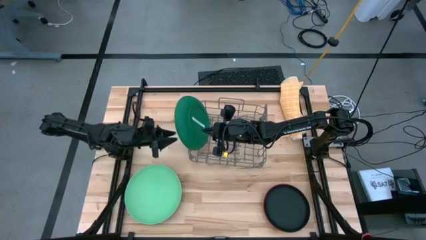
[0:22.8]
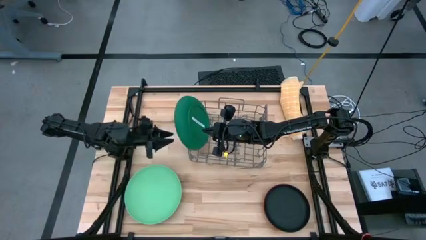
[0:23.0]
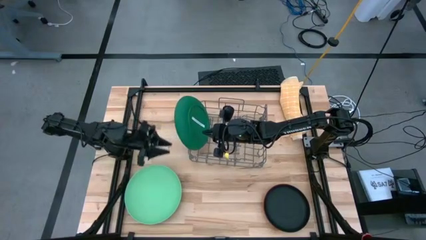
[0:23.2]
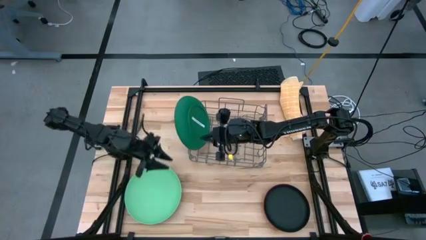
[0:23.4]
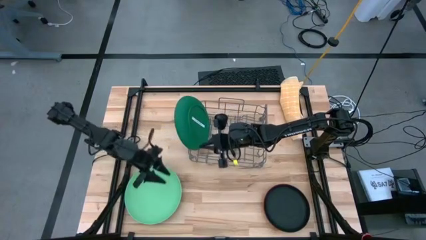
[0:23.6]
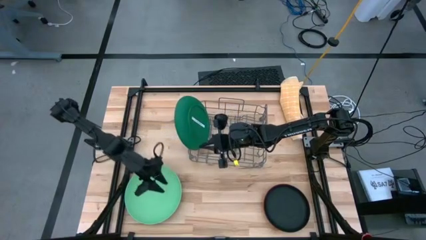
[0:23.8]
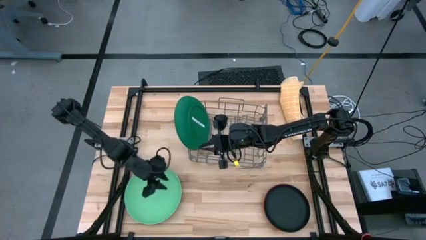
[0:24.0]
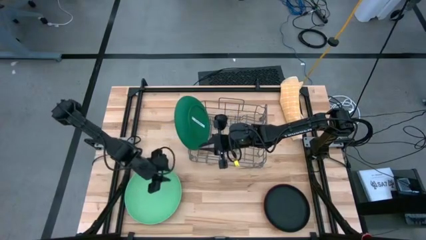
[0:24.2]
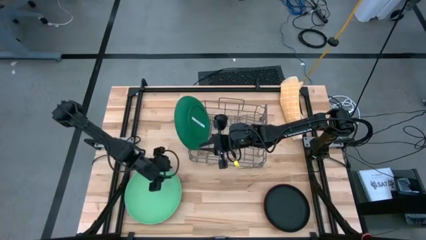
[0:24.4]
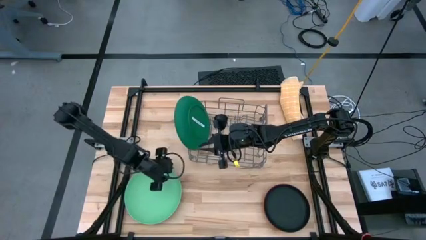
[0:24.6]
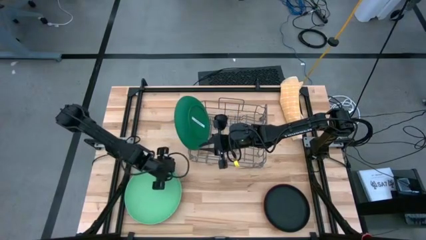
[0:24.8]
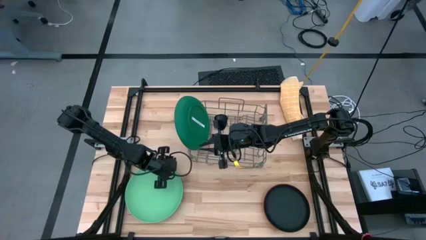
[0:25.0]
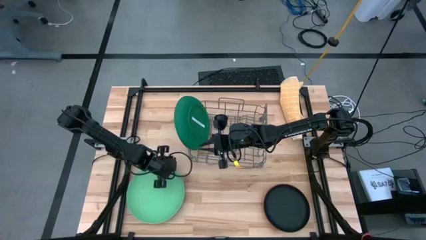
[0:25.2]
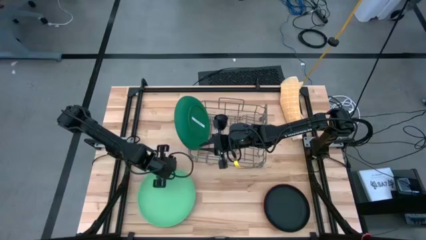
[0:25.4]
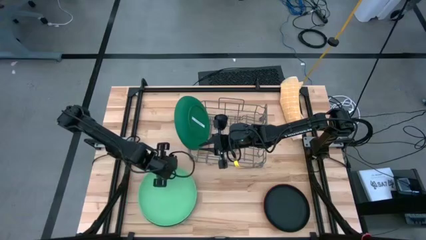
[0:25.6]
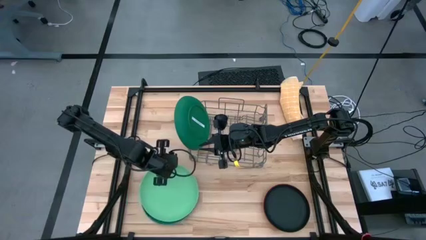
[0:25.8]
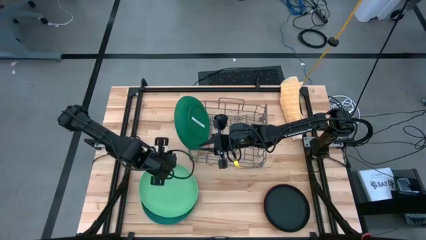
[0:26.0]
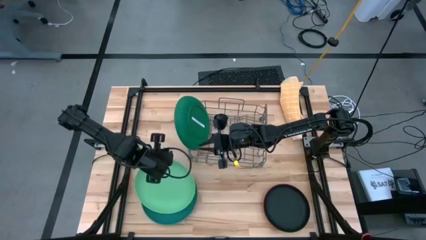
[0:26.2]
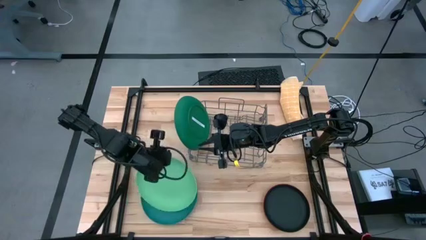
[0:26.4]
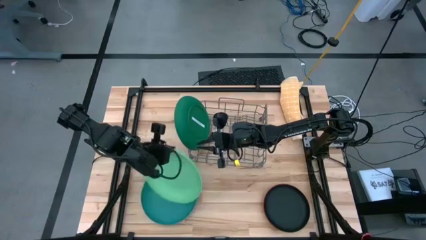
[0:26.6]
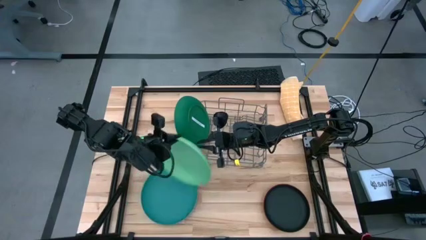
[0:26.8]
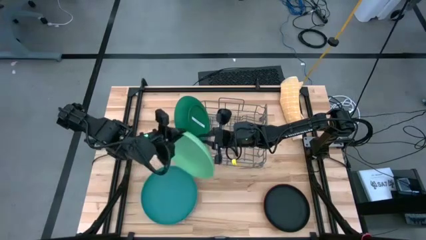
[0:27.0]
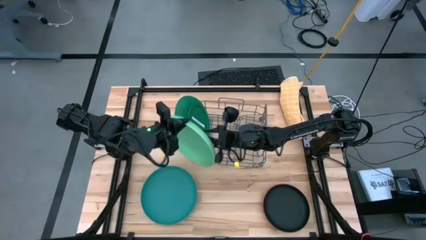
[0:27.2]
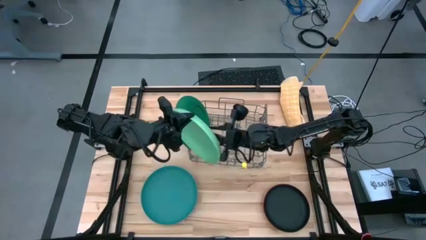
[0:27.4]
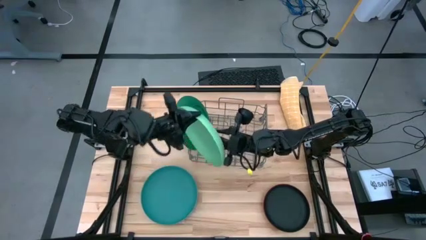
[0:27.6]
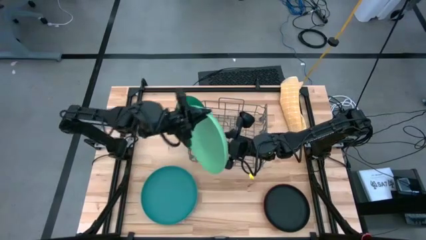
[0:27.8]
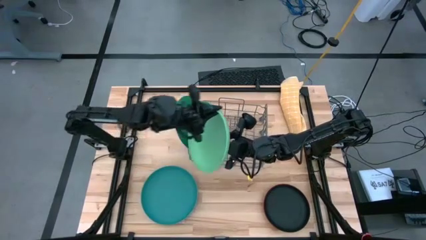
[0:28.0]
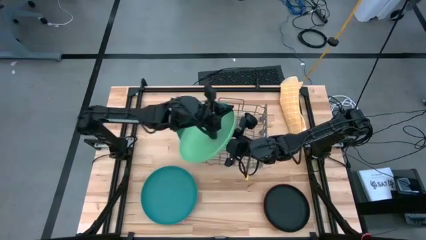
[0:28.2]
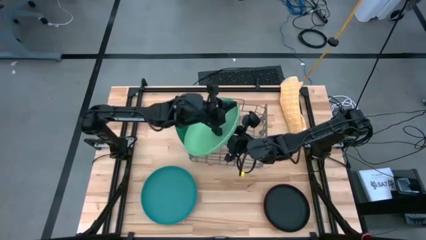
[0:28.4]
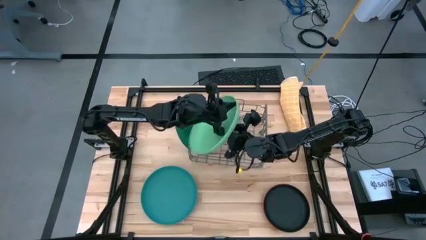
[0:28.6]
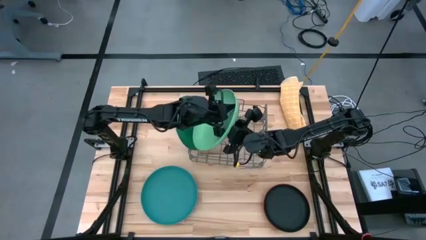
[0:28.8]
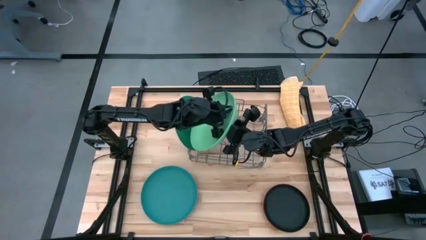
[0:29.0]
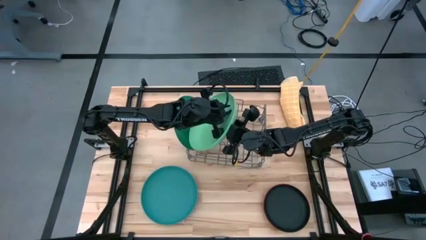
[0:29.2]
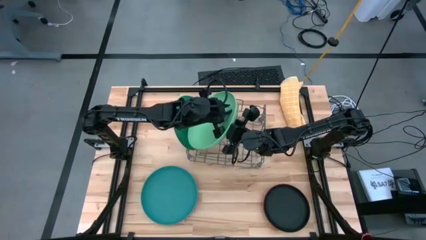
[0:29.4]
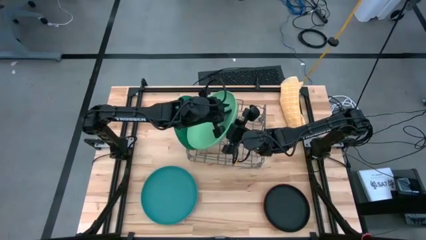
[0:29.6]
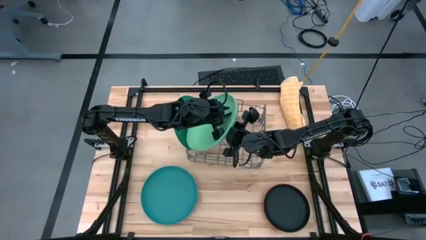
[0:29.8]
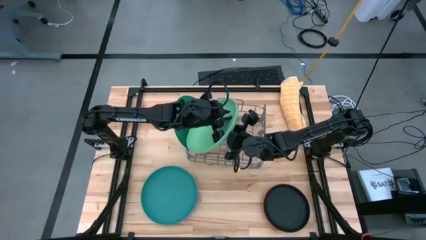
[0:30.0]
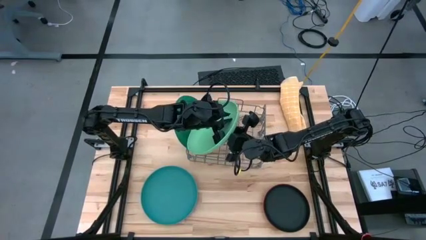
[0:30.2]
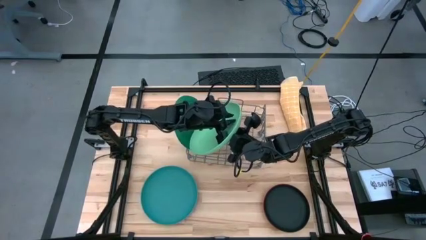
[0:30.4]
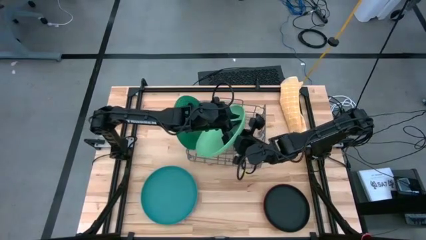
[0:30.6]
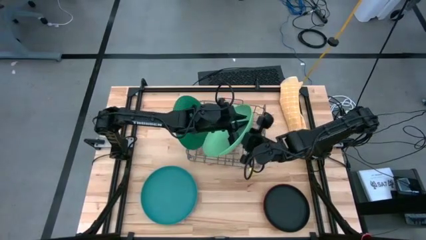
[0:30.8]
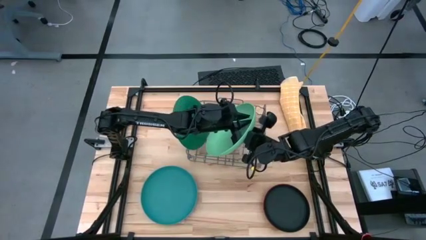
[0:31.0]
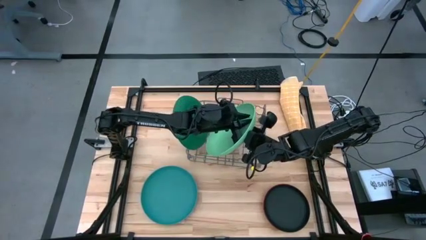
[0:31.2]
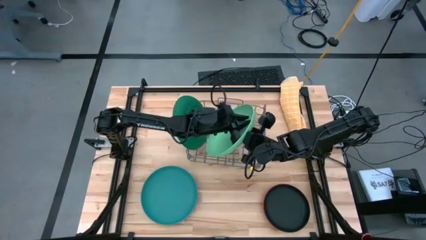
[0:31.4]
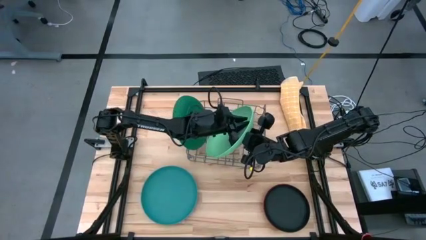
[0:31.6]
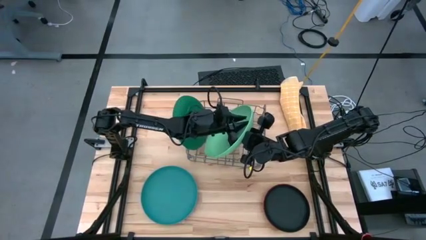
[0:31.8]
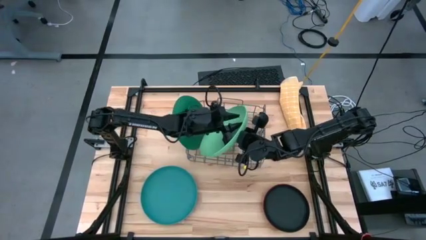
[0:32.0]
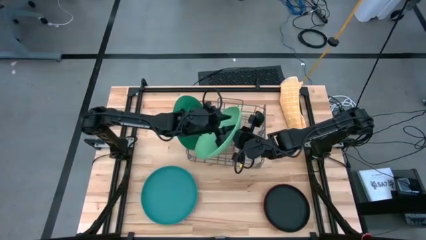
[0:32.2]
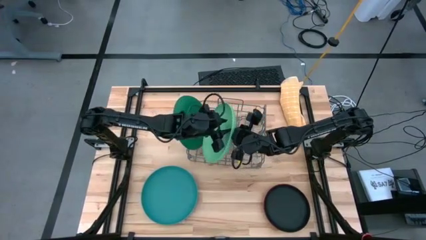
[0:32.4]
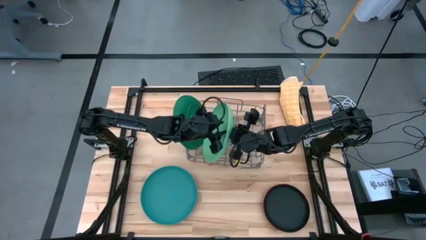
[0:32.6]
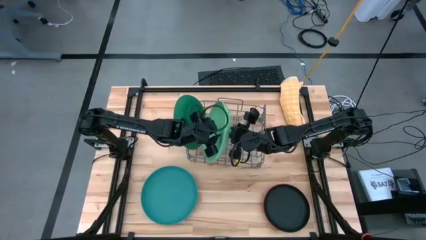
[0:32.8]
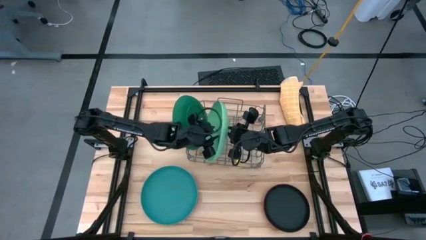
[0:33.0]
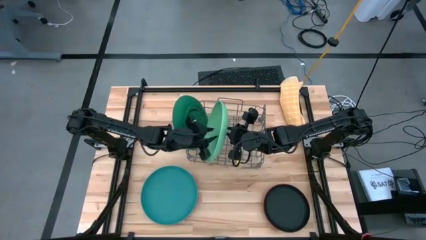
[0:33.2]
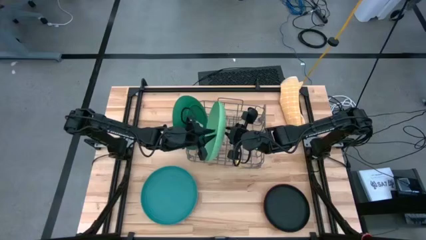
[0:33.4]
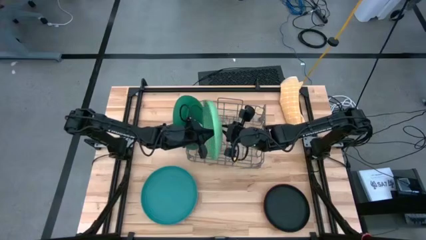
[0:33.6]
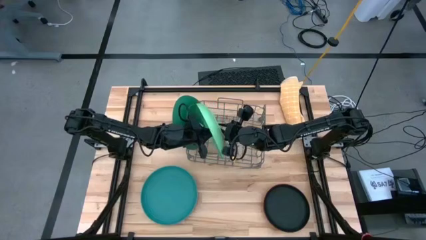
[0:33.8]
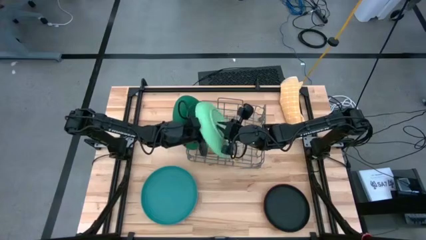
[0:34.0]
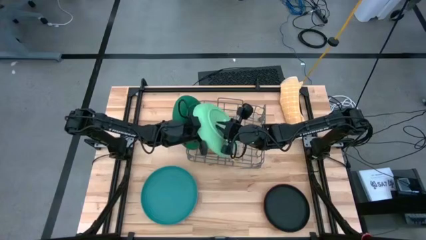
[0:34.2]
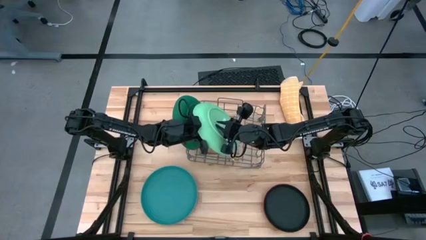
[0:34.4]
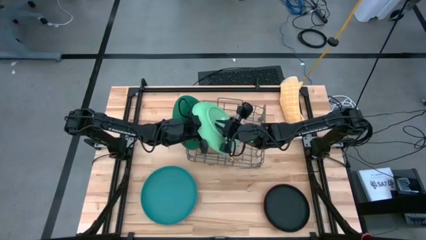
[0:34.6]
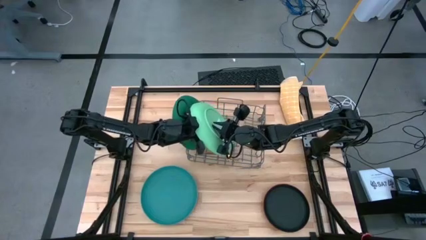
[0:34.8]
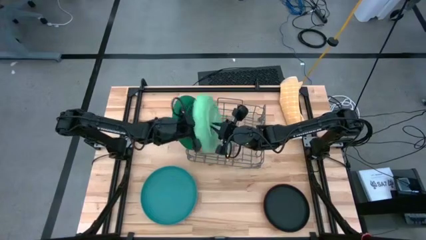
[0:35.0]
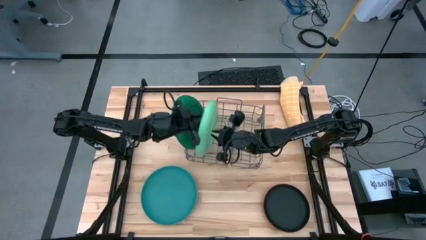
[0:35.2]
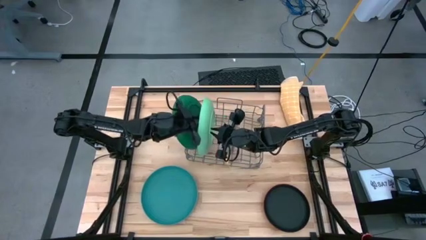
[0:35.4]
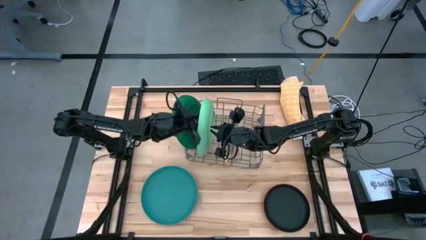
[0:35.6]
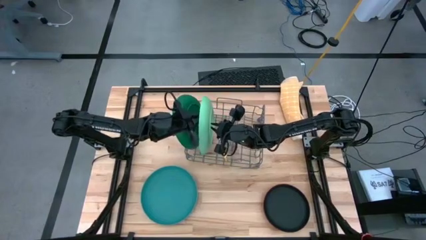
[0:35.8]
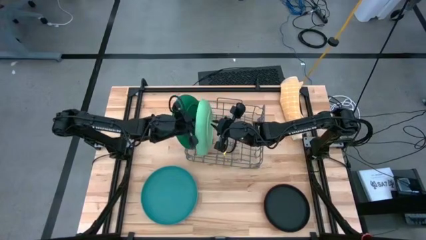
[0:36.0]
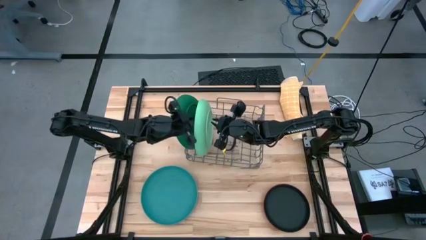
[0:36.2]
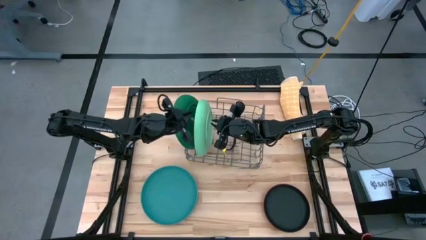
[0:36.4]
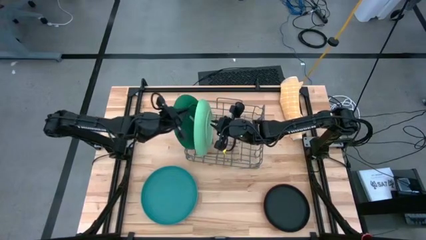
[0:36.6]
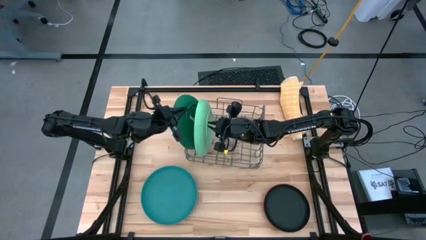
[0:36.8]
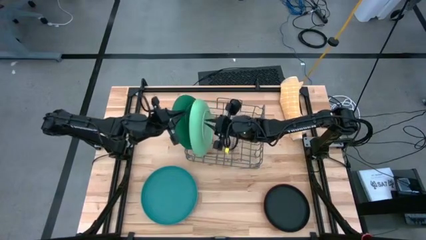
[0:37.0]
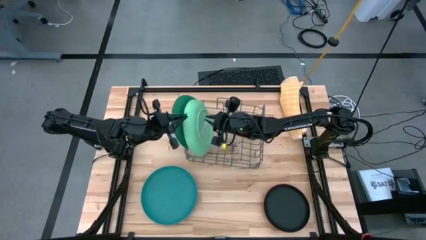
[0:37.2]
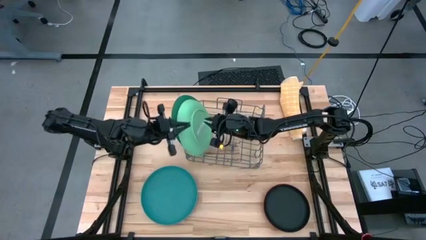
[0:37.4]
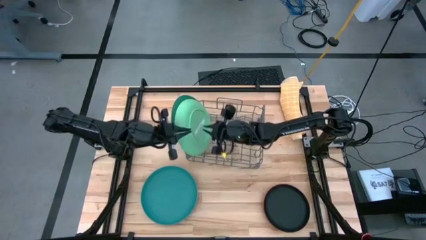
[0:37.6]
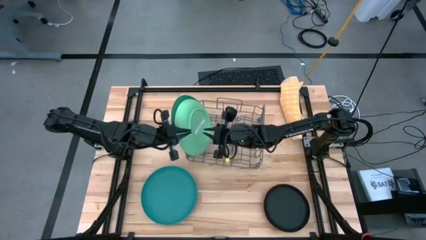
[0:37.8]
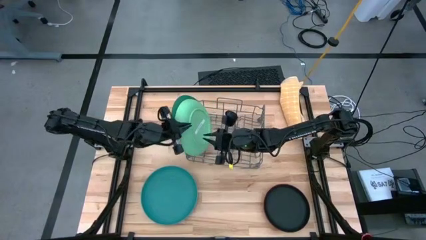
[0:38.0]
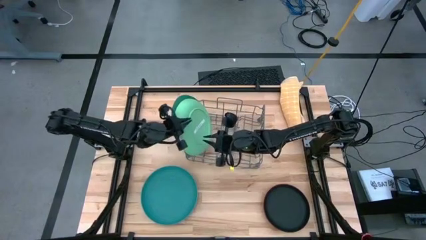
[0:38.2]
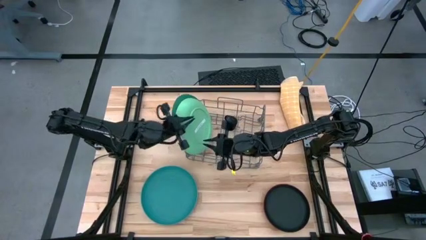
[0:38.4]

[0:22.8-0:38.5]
Task: Sort dishes
Put the light green plate into the dish rack
